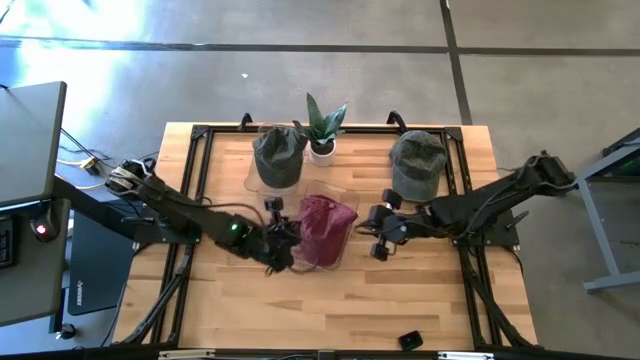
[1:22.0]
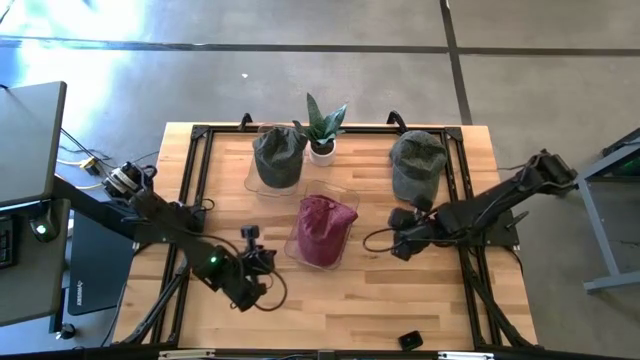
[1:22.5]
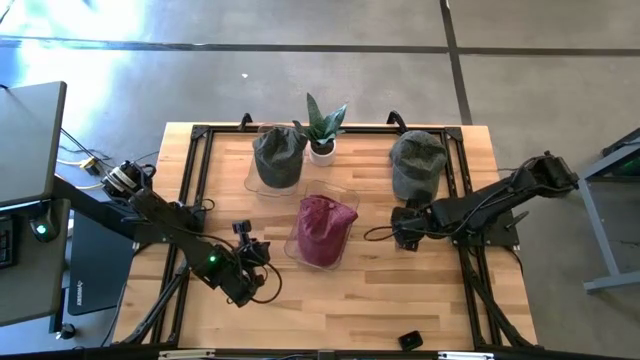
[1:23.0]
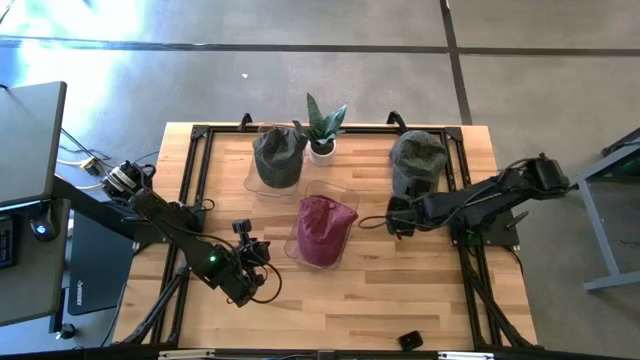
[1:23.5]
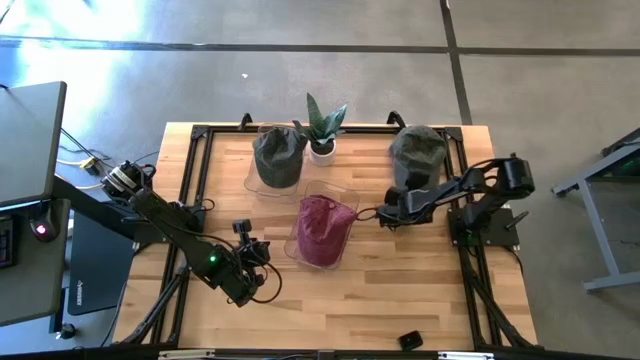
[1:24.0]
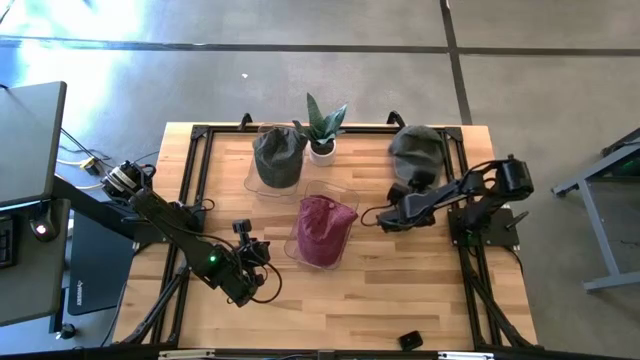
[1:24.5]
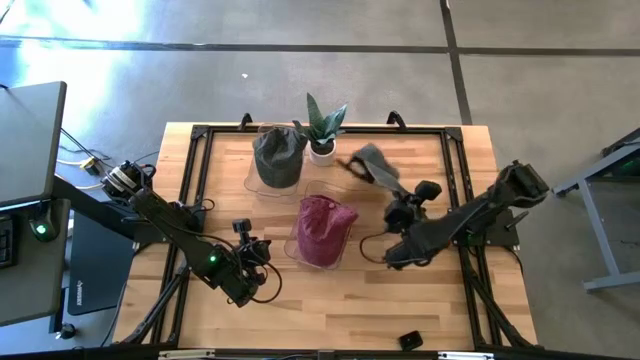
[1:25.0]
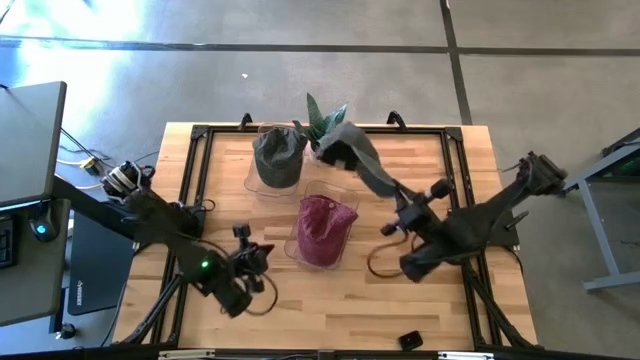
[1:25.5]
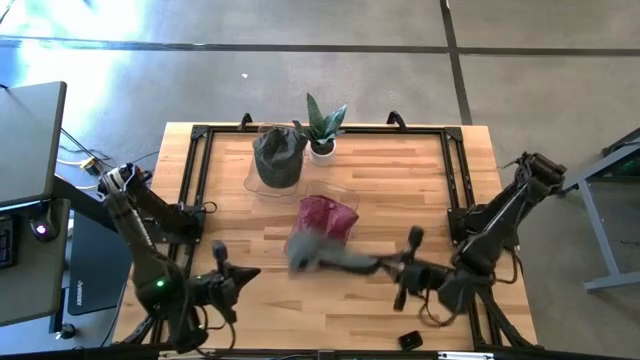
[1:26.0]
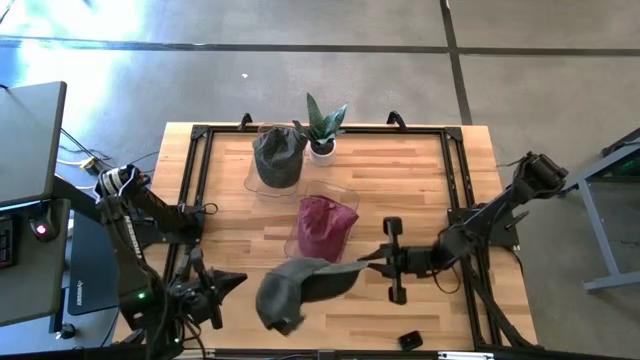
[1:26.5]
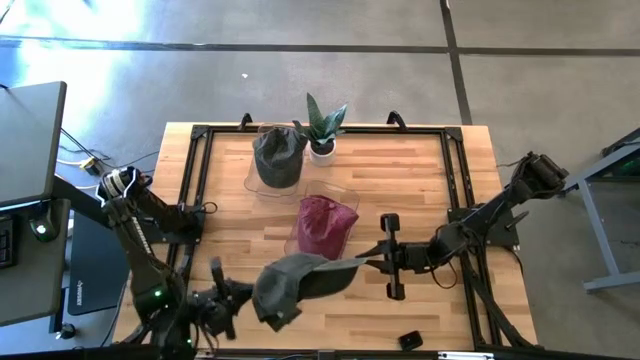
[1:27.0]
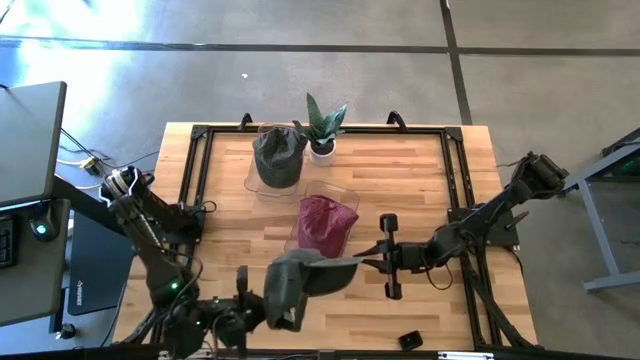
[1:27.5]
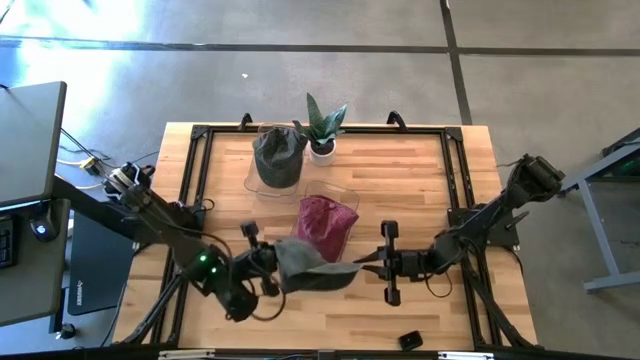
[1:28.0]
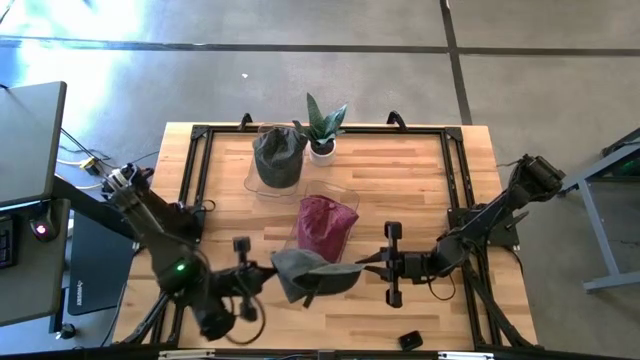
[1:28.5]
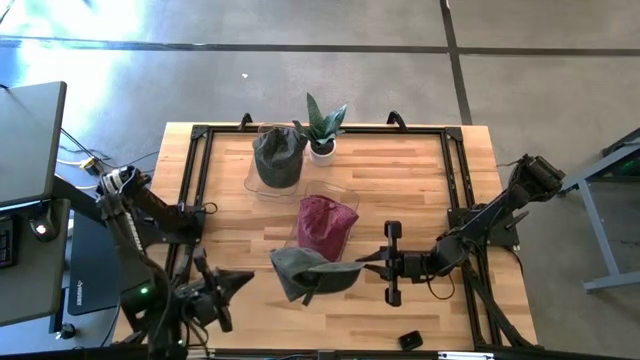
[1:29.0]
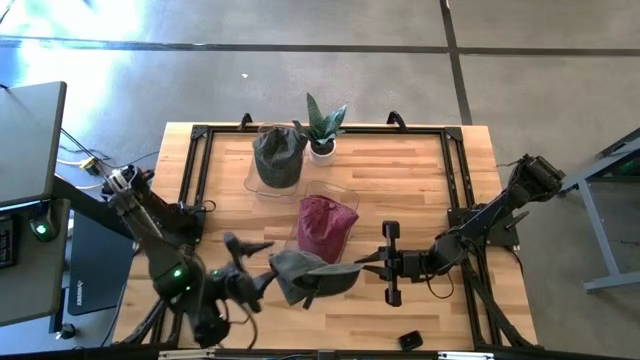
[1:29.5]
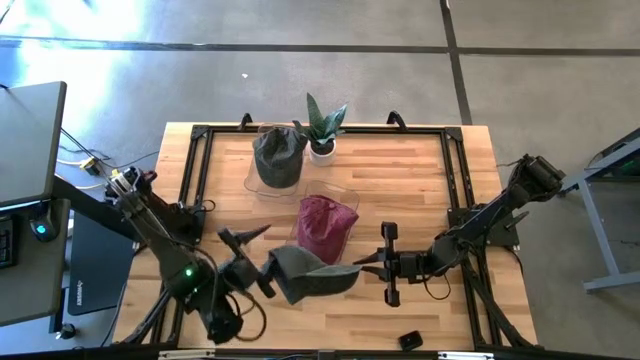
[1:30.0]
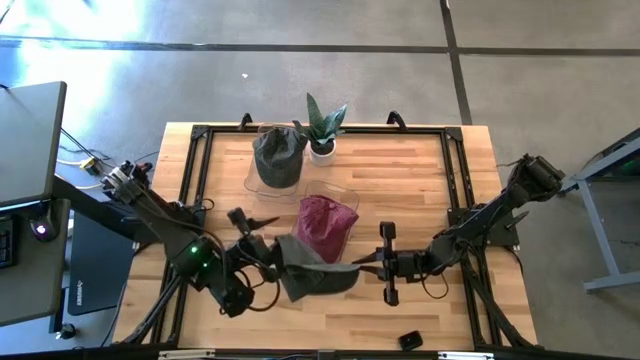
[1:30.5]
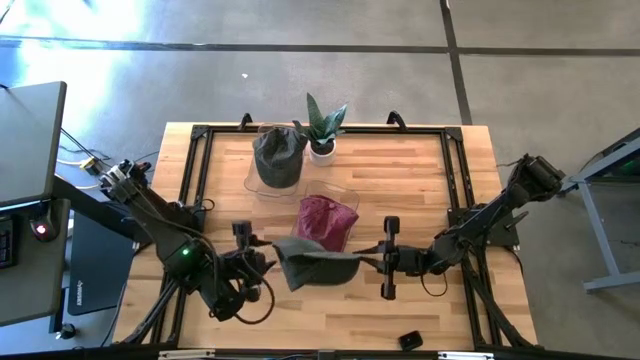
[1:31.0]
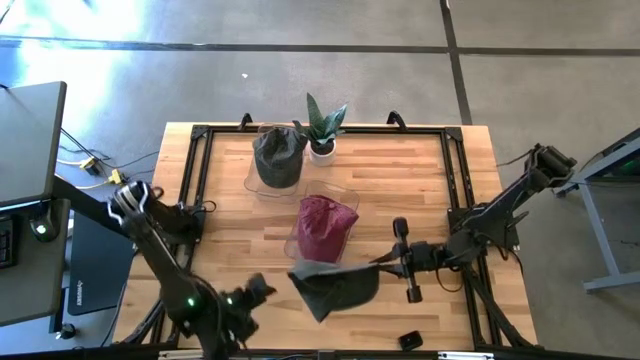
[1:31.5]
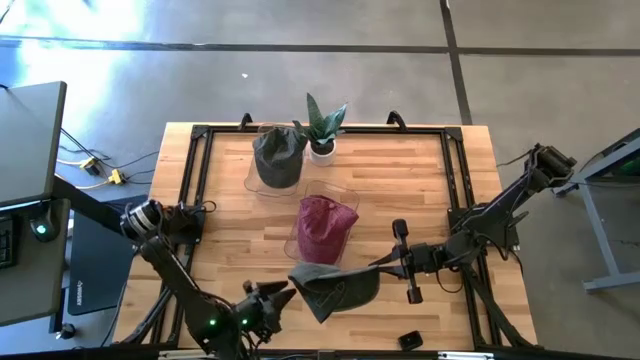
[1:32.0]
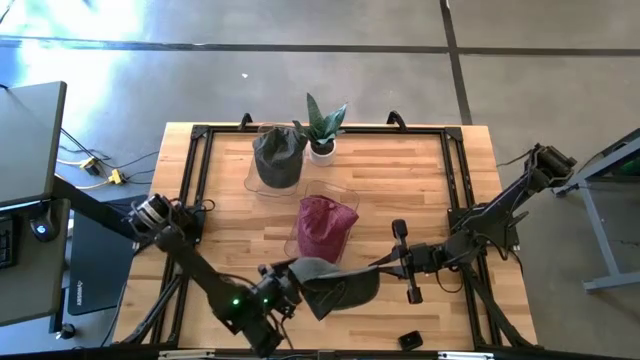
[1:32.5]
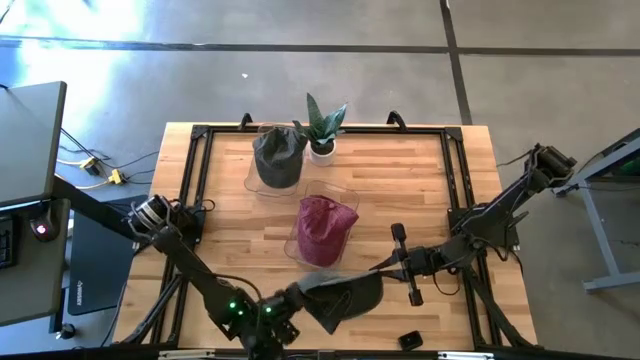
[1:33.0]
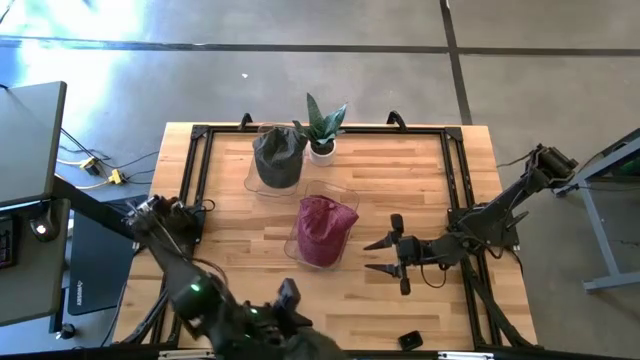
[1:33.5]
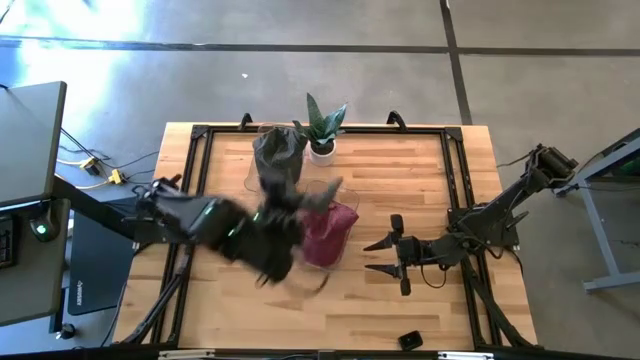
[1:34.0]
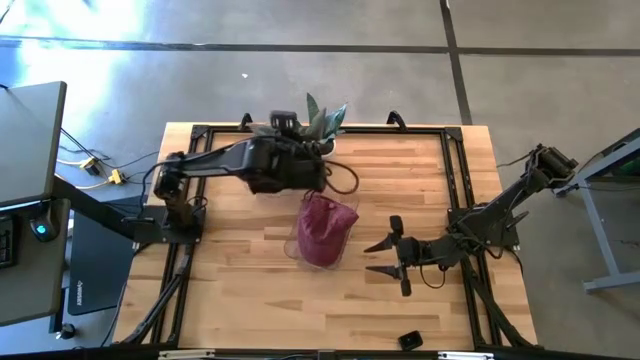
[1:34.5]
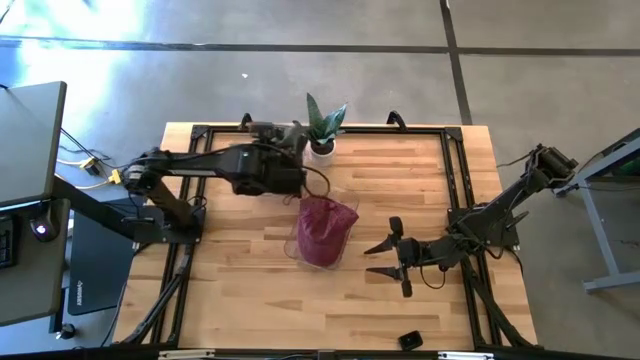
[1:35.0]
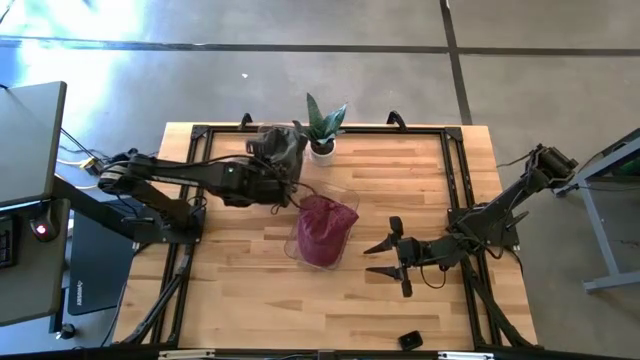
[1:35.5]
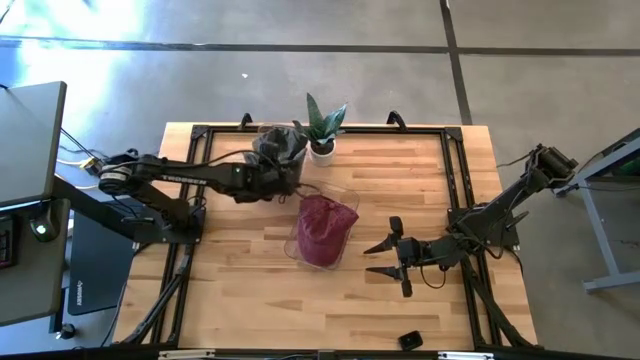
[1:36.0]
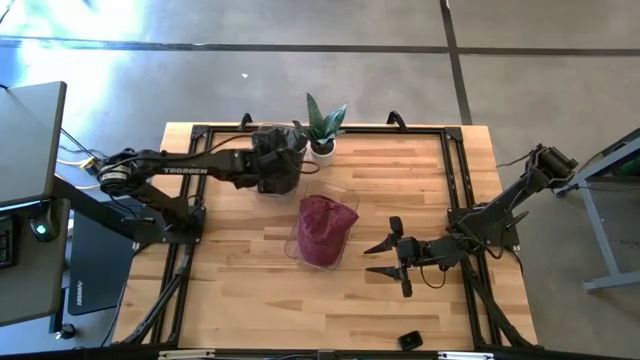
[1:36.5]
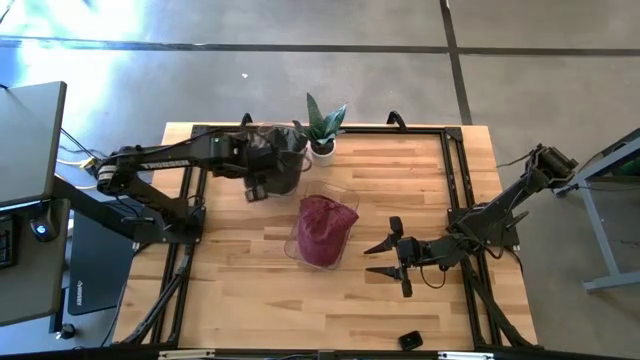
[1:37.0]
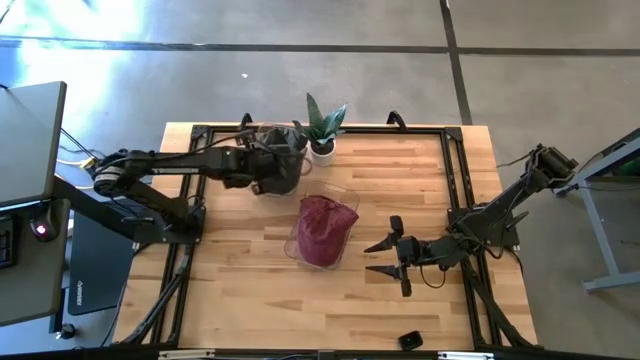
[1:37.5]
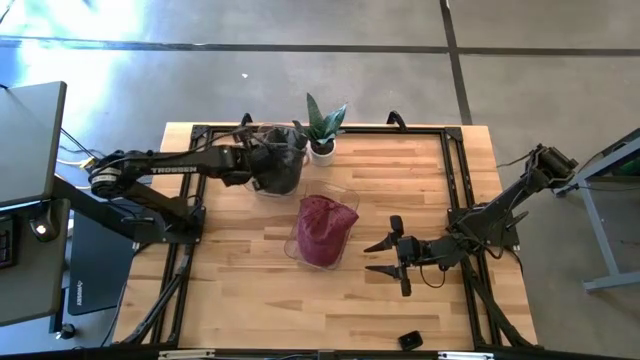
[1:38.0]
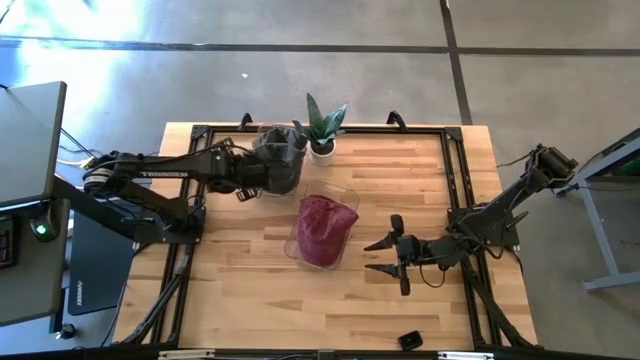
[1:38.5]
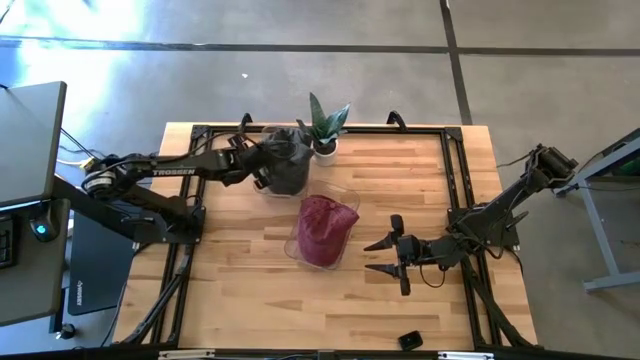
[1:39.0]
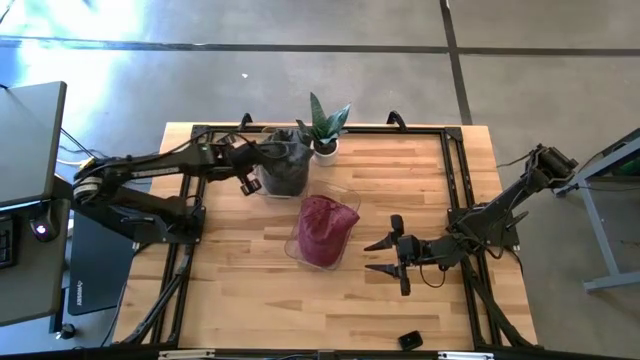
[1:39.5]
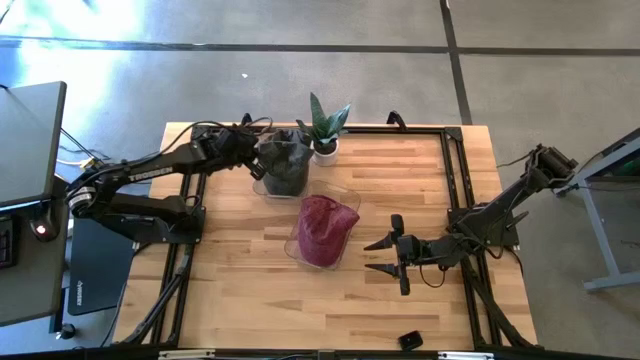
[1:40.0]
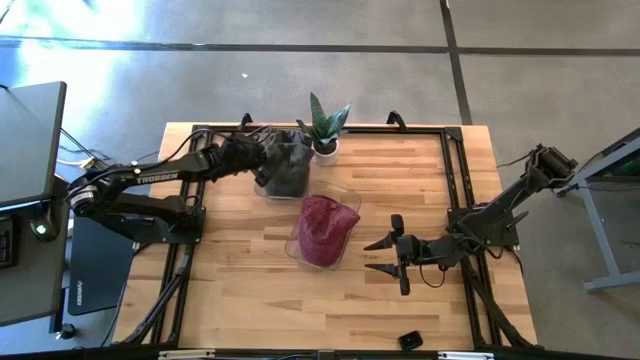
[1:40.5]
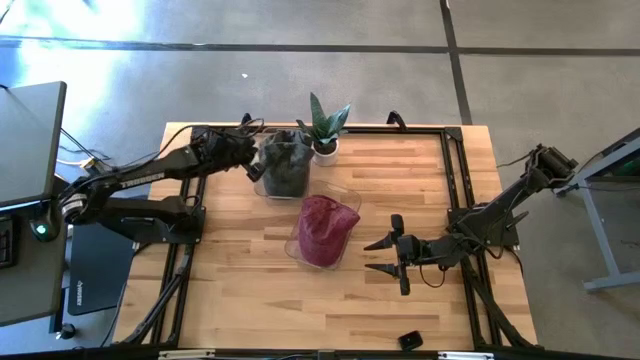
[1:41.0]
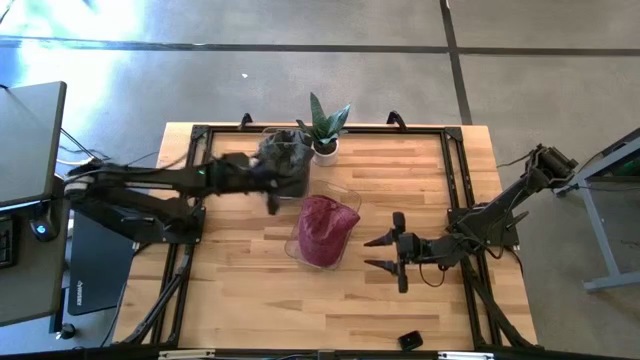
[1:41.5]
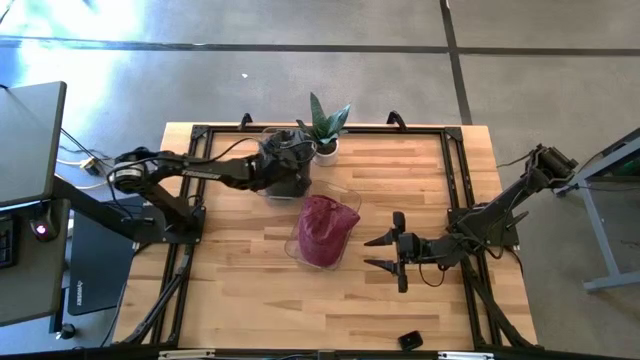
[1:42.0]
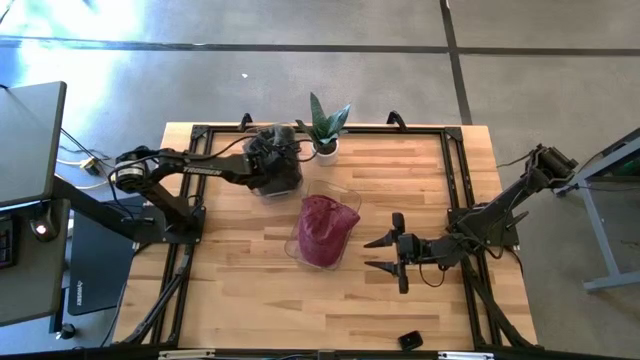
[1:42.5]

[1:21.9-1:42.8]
Task: Pick & Place hat
Put the black cap into the top transparent bin

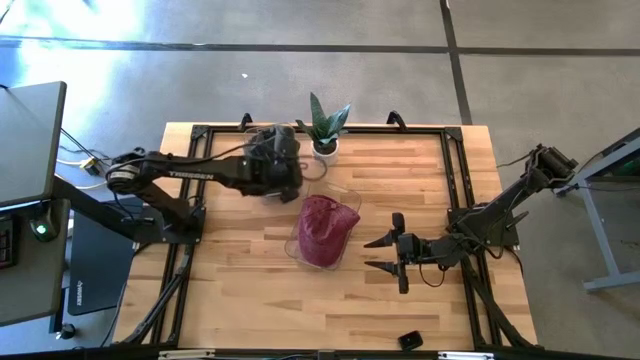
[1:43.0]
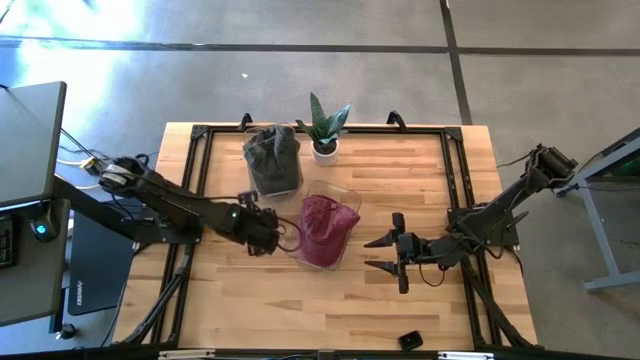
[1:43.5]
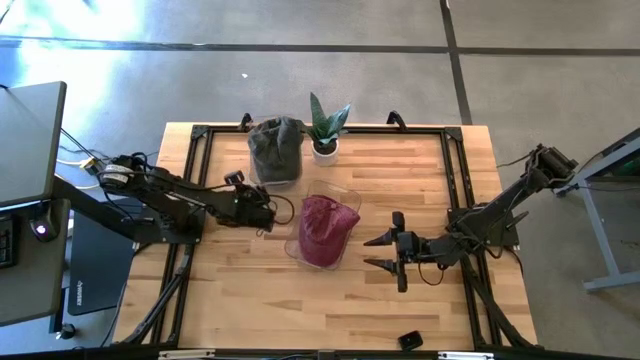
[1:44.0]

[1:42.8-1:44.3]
Adjust the transparent bins
